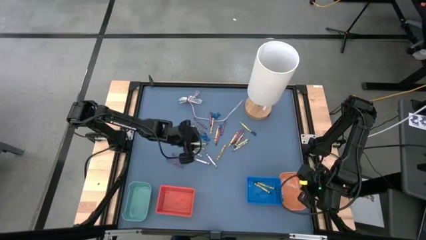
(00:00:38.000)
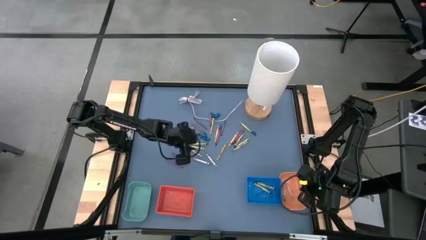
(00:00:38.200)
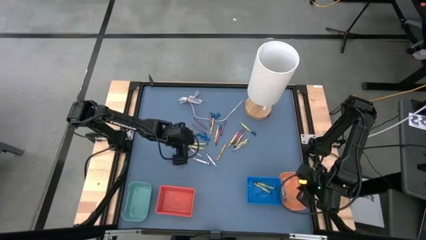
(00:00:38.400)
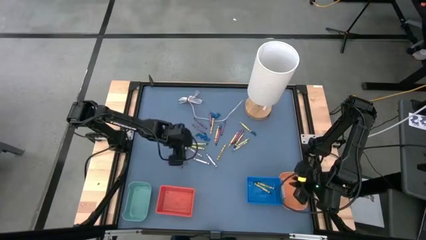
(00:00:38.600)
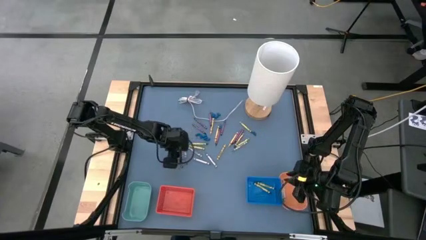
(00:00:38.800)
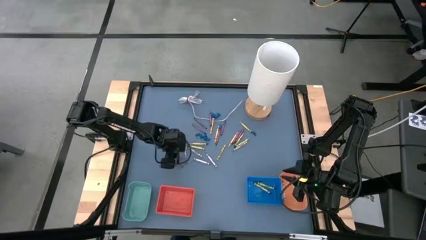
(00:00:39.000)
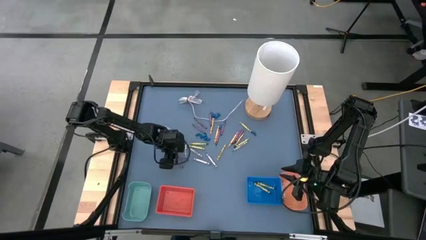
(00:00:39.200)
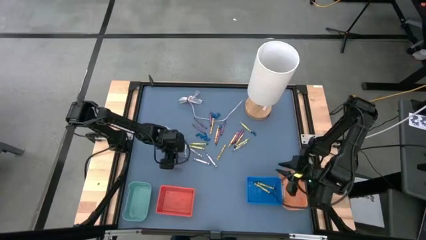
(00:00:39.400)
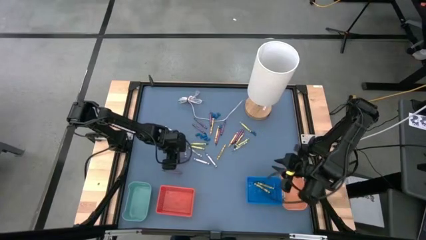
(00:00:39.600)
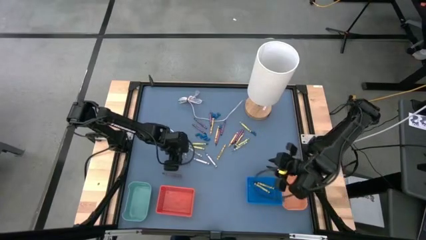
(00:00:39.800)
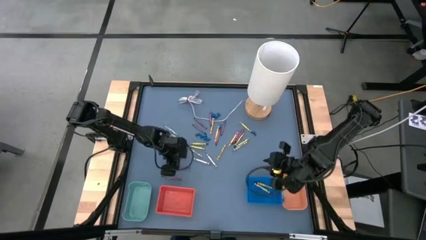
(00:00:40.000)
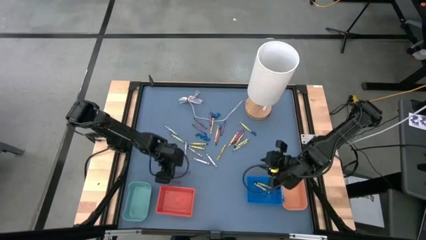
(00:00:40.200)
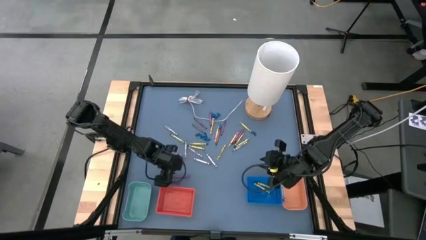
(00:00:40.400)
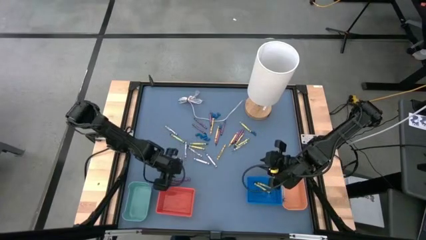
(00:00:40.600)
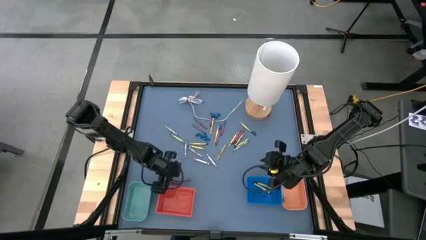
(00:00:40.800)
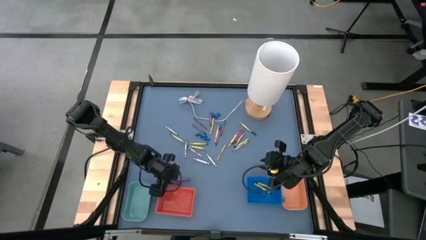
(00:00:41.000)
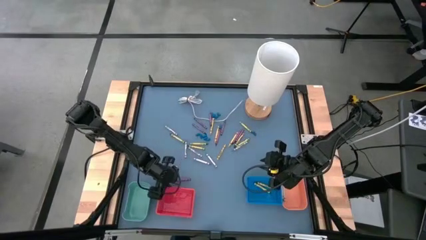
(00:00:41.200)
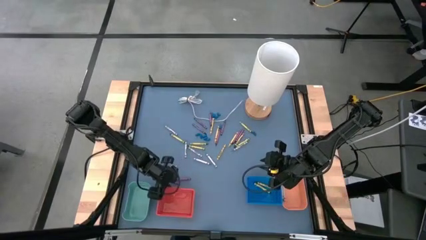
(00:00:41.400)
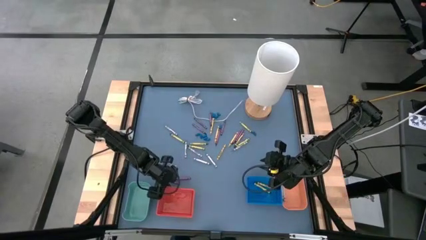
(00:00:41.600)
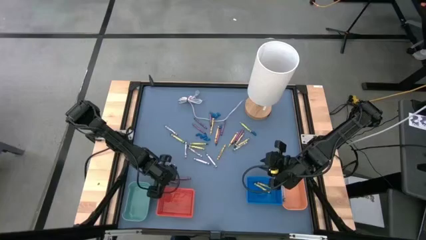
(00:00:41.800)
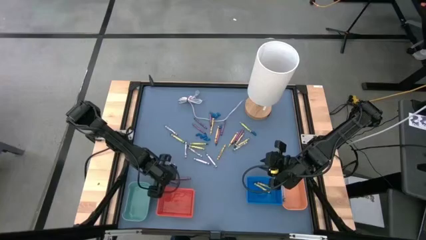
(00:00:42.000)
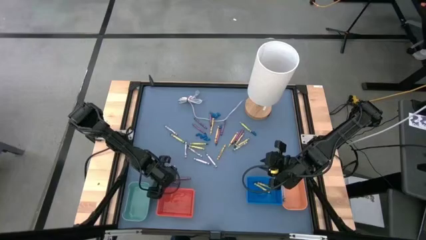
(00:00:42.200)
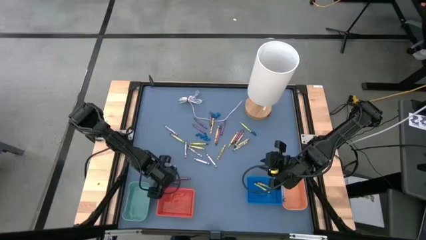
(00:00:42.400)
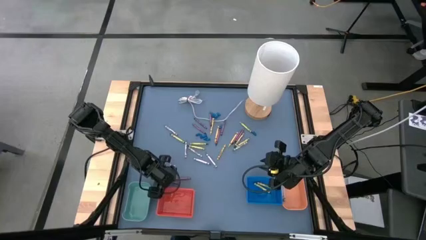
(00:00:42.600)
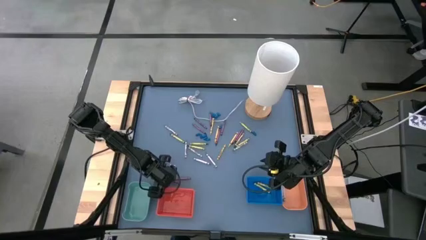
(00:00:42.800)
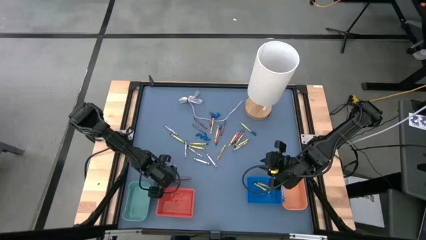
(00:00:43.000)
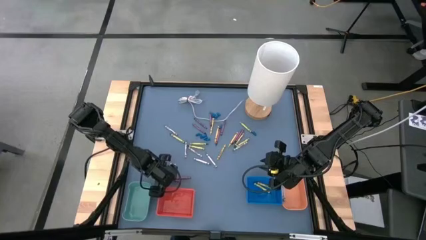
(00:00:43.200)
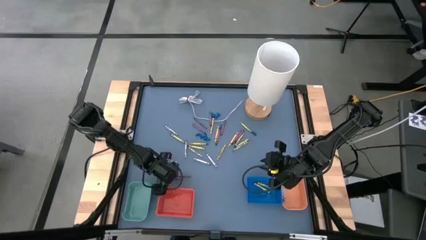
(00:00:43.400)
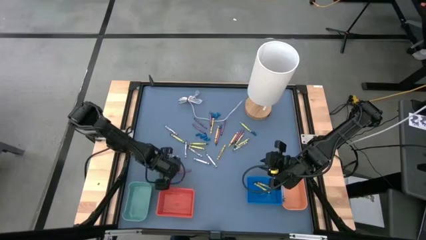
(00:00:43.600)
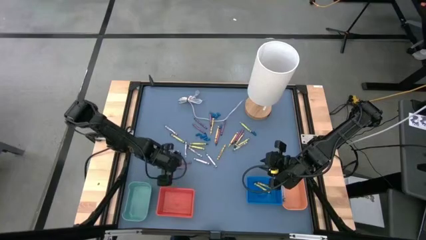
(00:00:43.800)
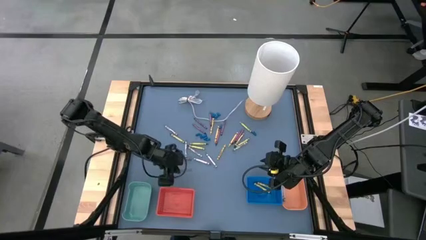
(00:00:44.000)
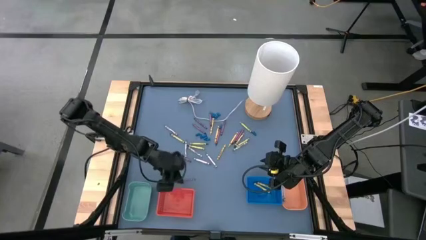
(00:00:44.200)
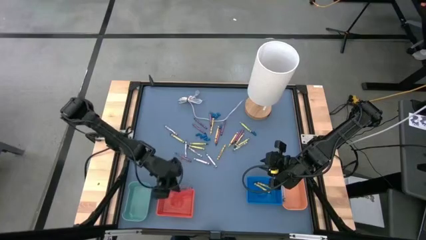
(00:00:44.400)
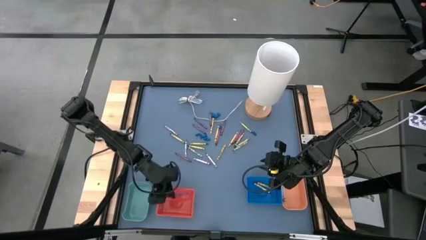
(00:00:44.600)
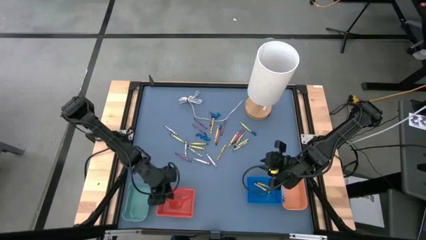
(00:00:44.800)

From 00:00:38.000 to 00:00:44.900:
Task: Sort crayons
Put the red crayon into the red basket

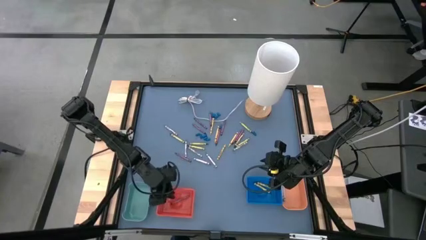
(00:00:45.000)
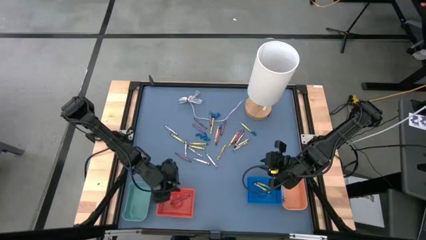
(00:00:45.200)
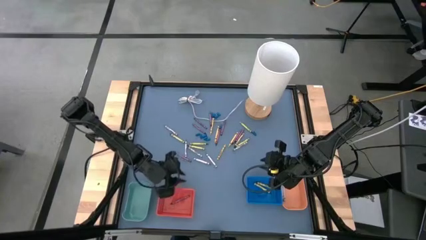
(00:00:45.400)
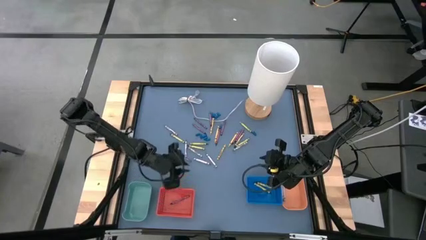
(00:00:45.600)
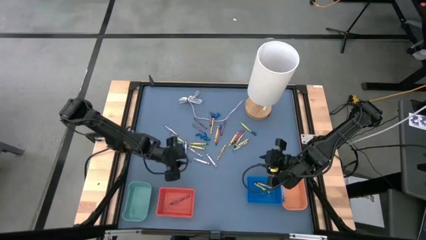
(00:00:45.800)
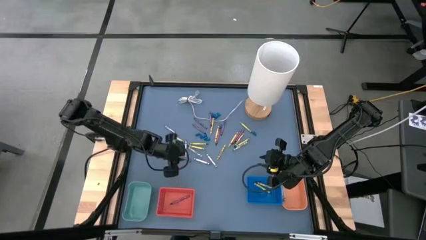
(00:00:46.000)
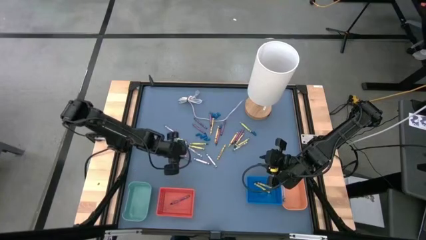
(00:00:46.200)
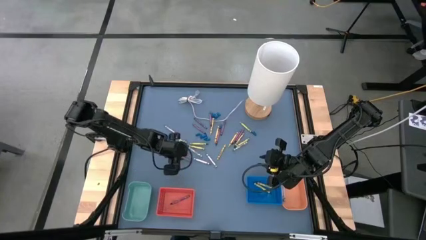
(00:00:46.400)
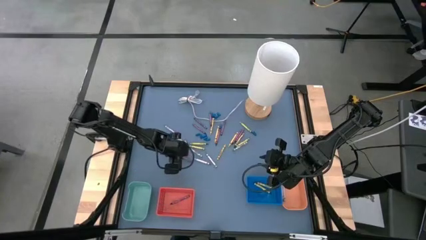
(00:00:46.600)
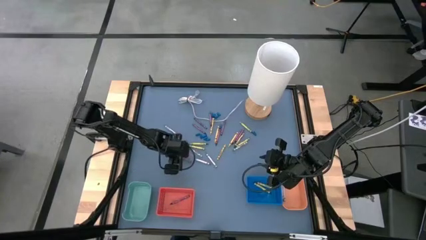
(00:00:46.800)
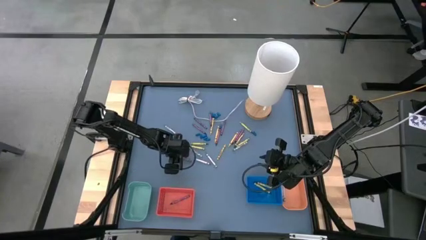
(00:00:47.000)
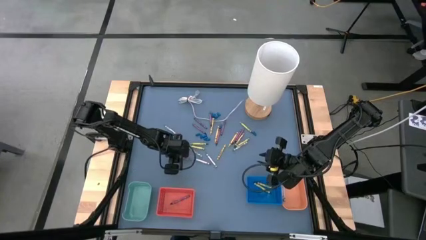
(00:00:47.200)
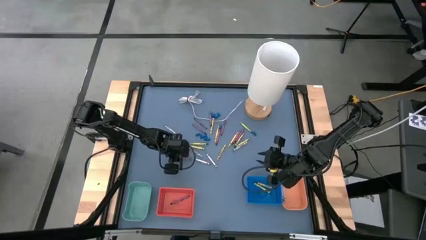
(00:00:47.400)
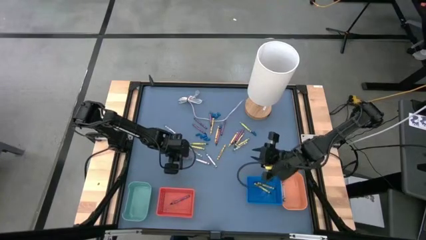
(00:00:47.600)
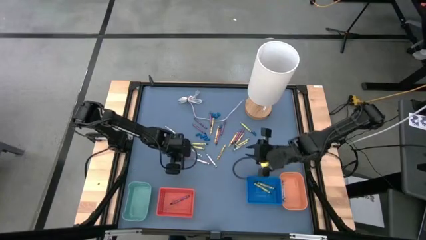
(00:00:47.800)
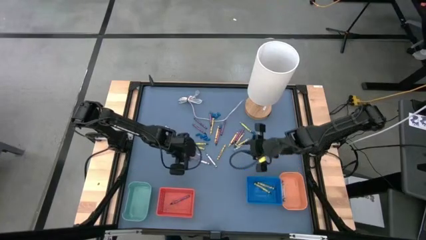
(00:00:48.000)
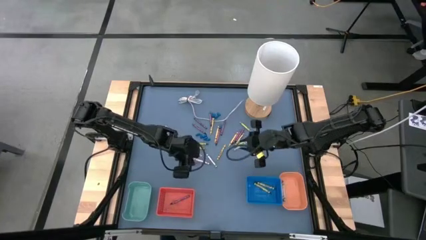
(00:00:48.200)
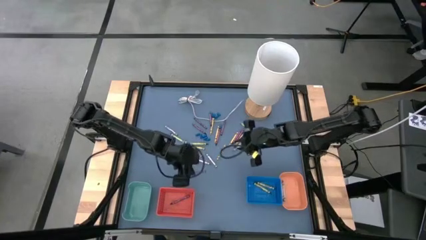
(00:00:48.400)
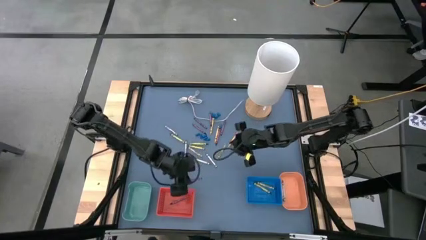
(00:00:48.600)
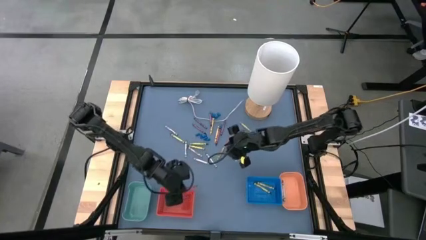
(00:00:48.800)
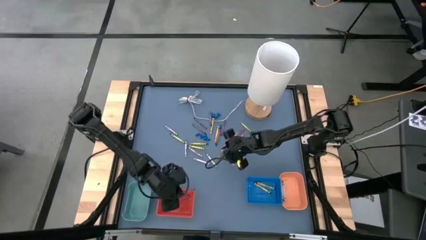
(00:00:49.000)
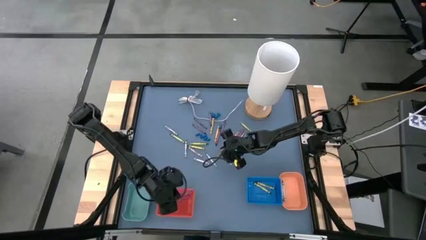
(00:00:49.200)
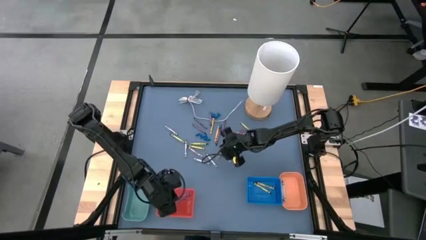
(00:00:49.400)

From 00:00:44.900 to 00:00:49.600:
Put the red crayon into the red basket

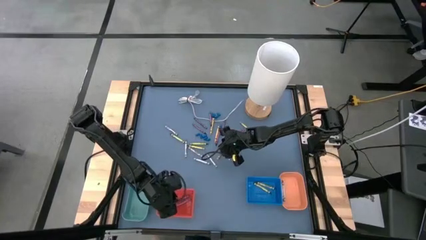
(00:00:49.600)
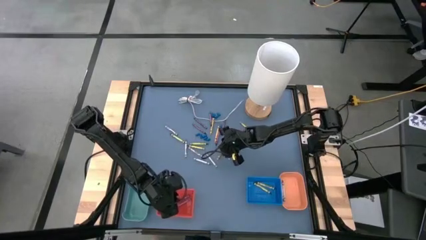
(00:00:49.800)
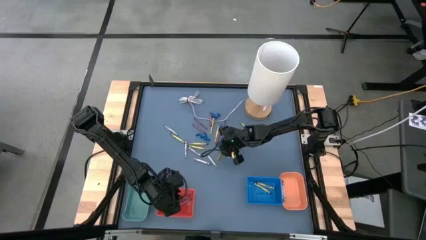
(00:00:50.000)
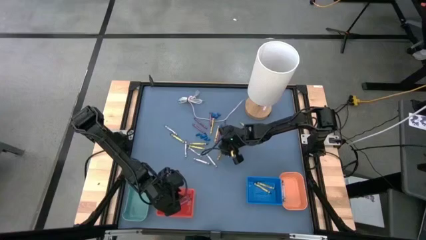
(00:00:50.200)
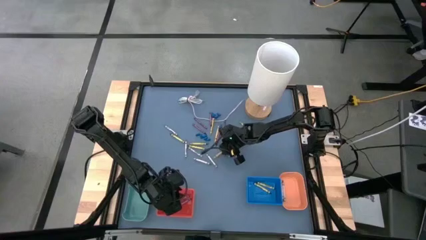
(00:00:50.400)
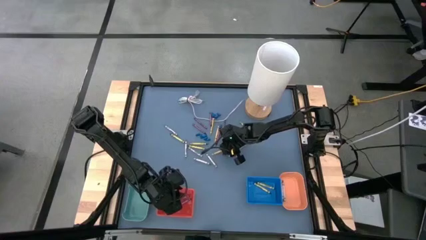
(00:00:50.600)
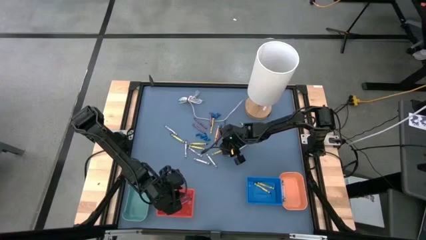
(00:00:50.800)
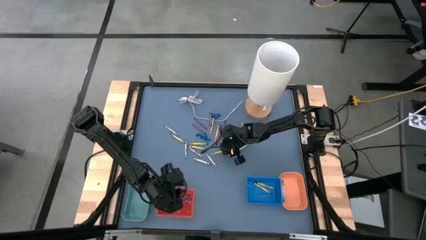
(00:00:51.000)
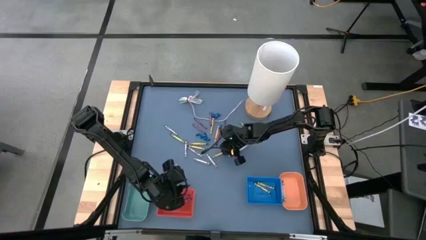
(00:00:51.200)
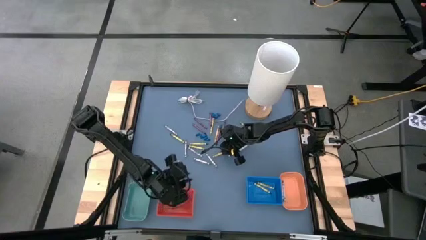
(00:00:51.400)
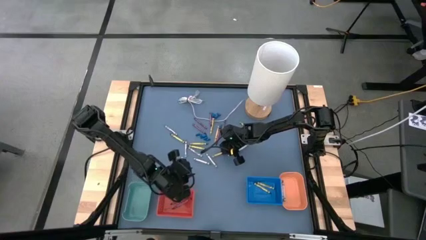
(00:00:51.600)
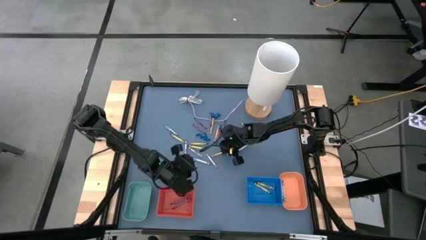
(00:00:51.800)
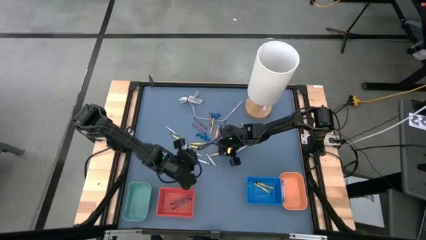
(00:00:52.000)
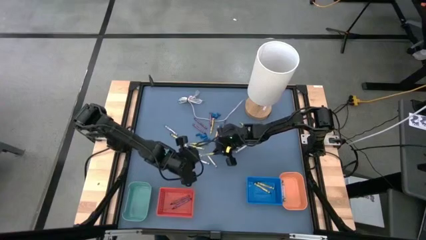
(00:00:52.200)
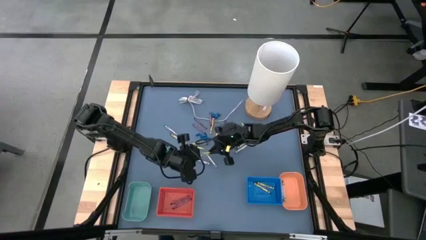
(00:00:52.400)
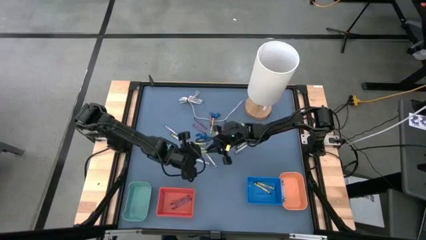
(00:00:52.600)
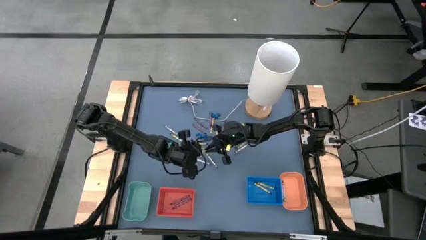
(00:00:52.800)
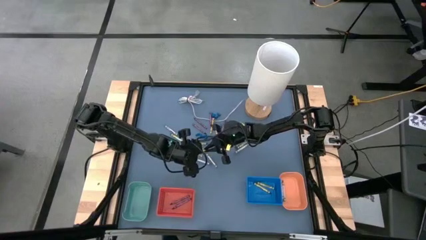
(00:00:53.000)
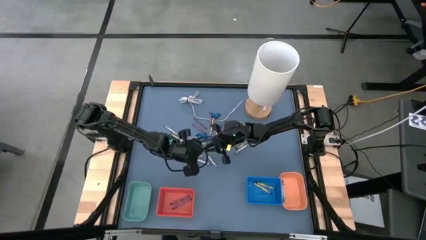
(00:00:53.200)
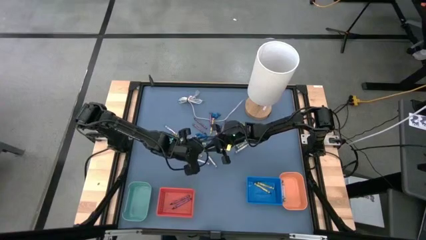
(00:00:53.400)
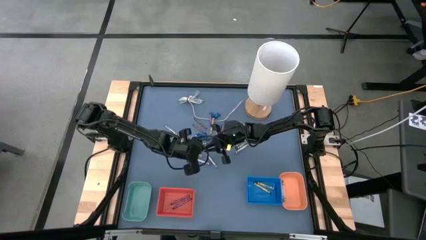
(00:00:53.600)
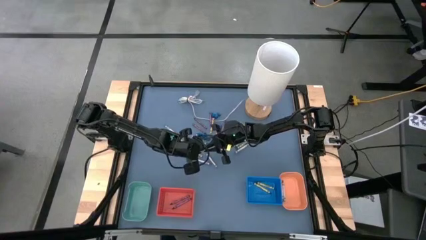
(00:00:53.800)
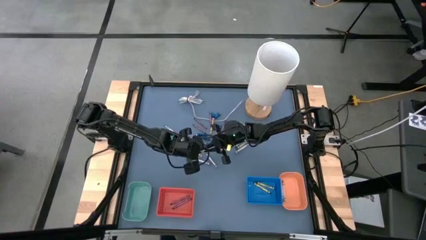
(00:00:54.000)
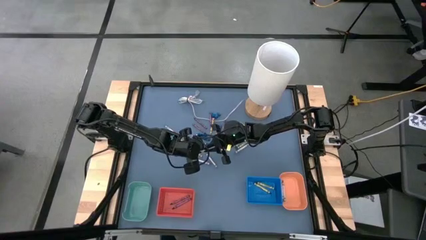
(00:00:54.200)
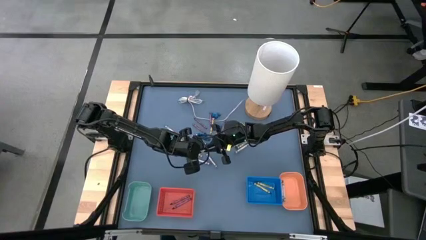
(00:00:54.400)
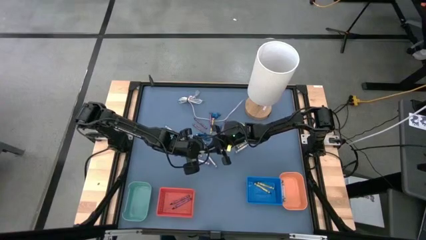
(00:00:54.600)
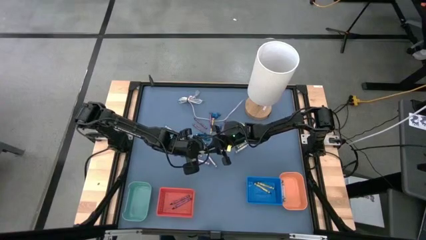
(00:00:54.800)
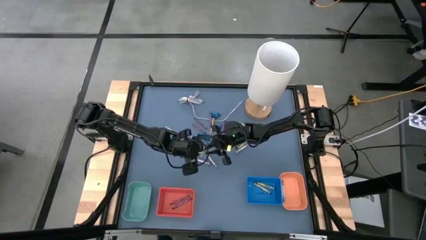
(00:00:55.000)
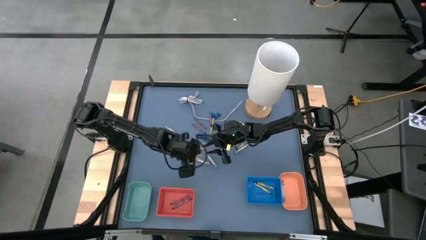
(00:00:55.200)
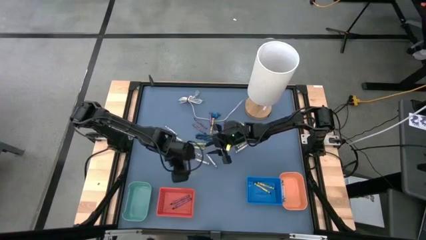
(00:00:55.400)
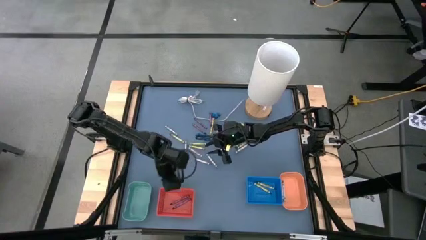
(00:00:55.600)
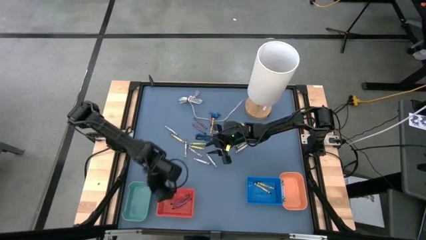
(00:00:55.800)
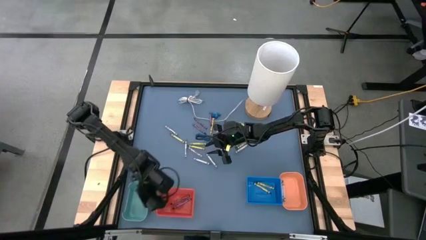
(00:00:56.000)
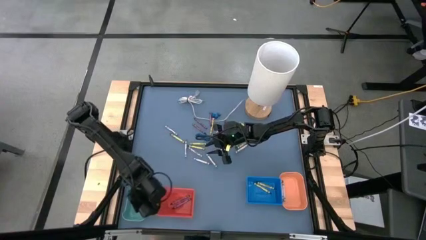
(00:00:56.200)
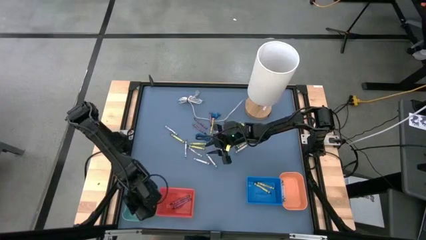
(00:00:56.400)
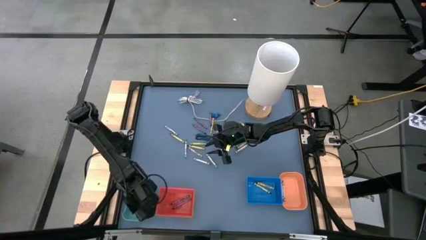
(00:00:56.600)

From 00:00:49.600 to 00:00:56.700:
Put the yellow crayon into the green bin
